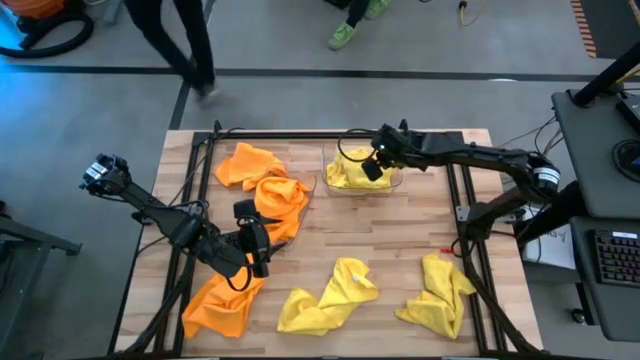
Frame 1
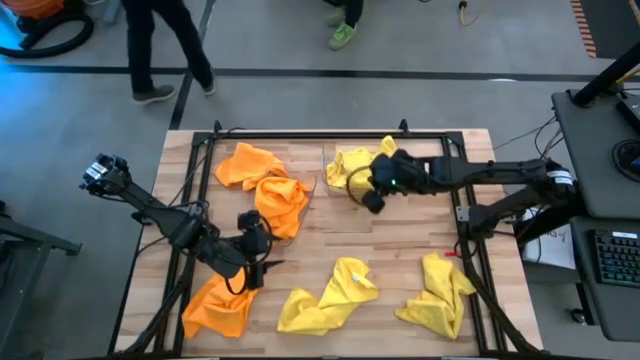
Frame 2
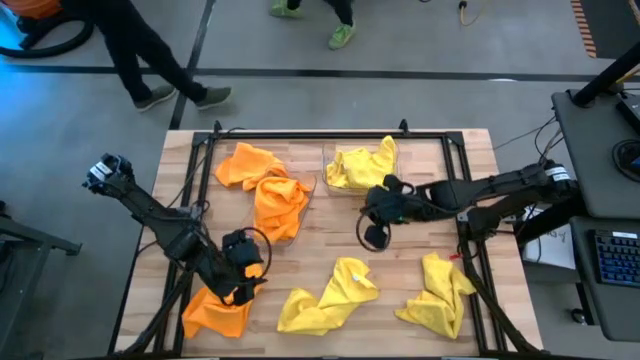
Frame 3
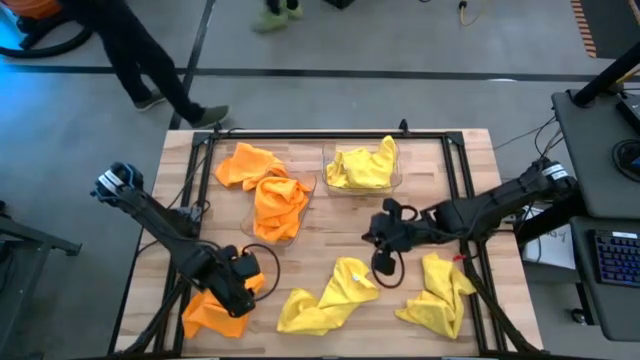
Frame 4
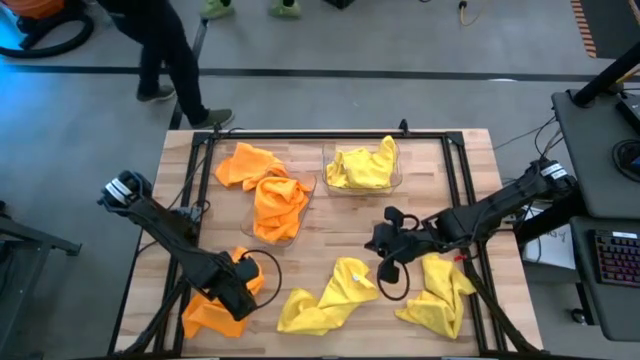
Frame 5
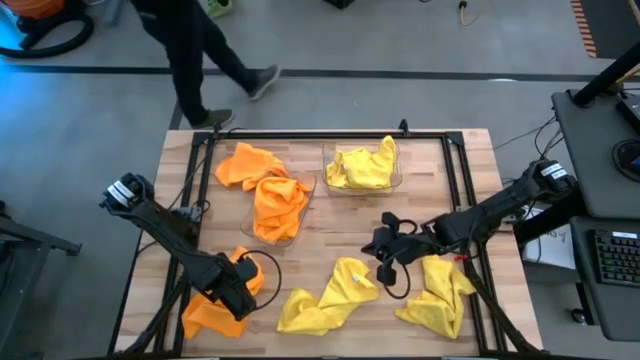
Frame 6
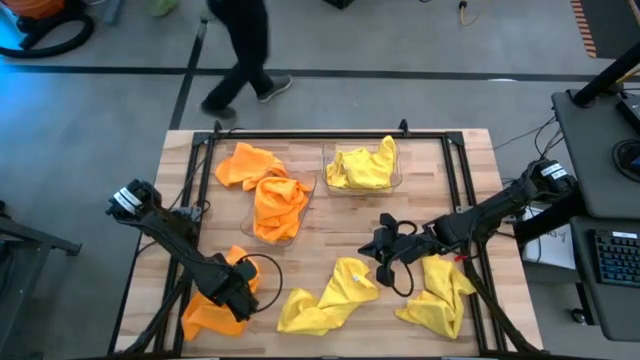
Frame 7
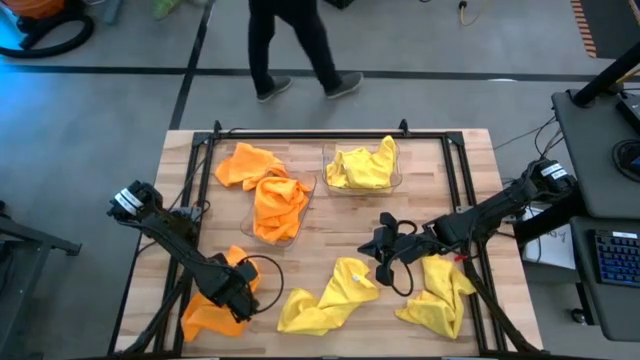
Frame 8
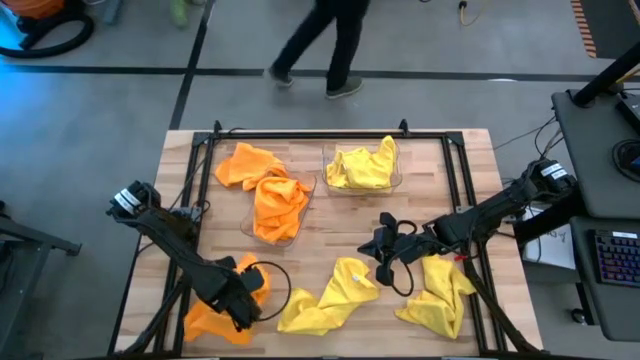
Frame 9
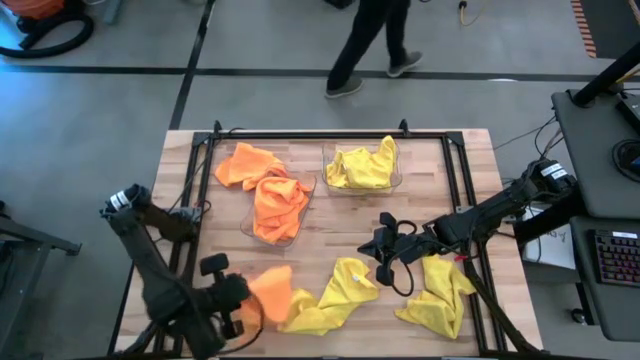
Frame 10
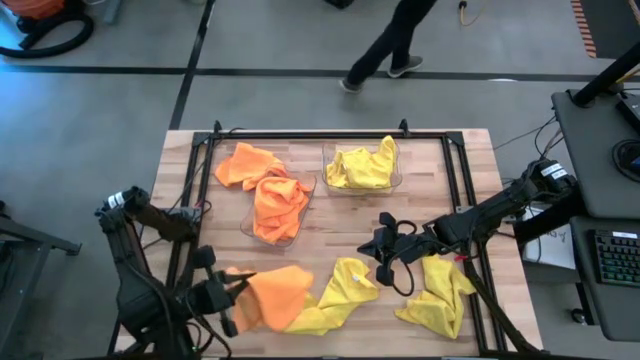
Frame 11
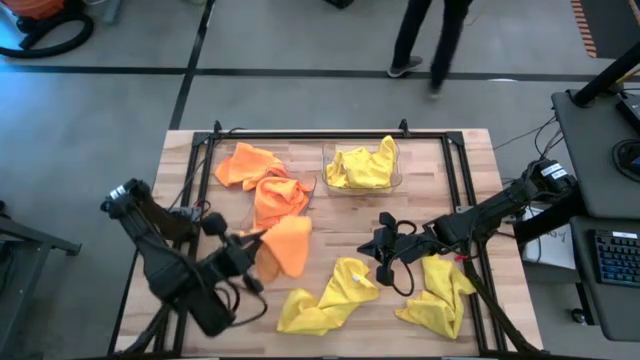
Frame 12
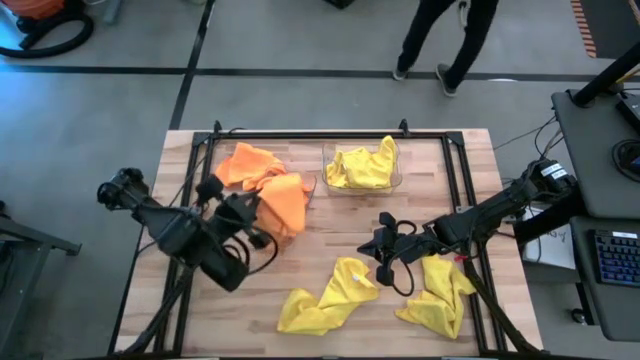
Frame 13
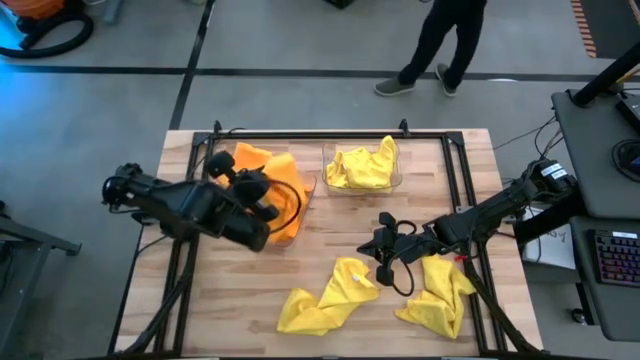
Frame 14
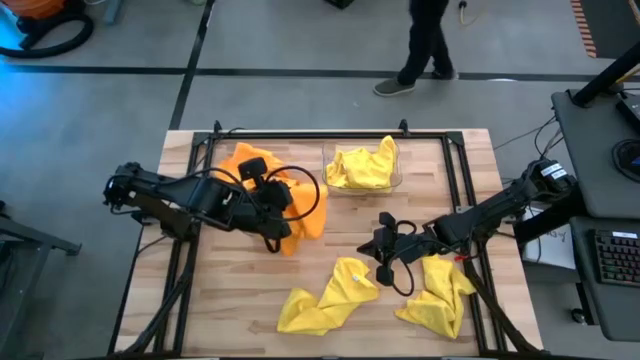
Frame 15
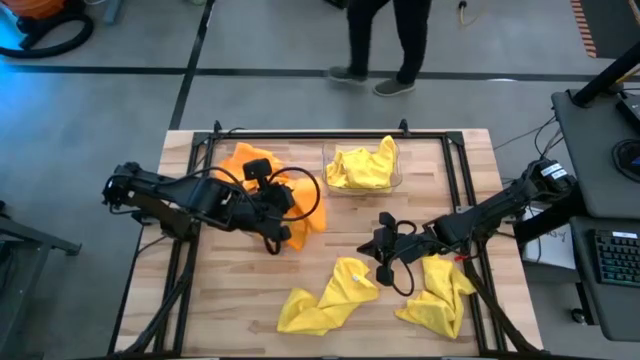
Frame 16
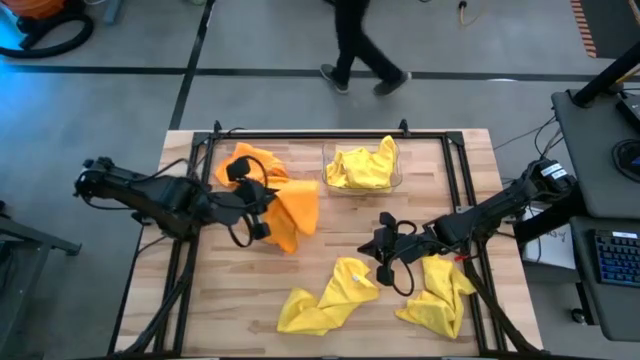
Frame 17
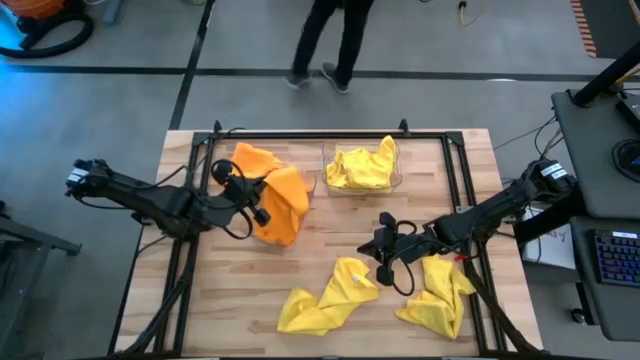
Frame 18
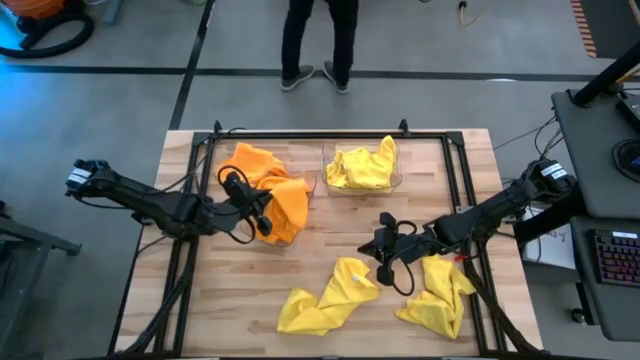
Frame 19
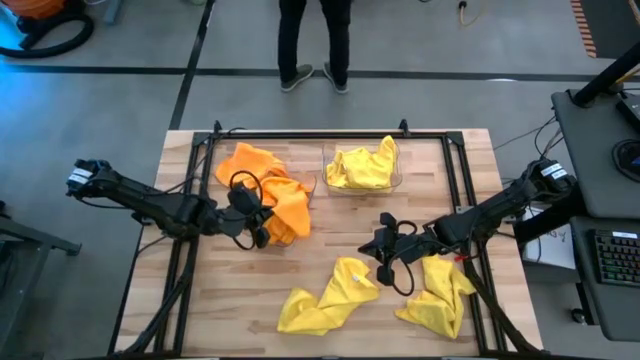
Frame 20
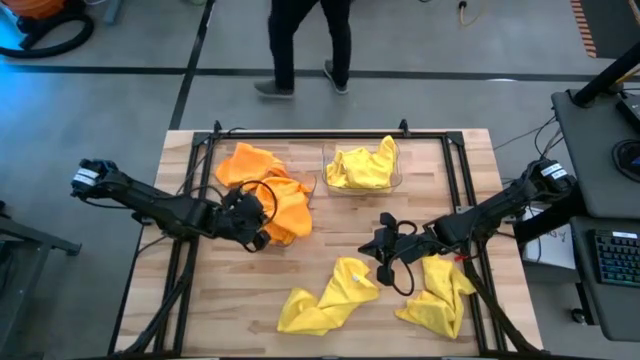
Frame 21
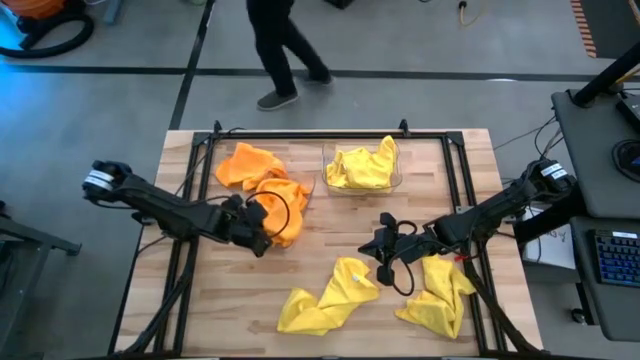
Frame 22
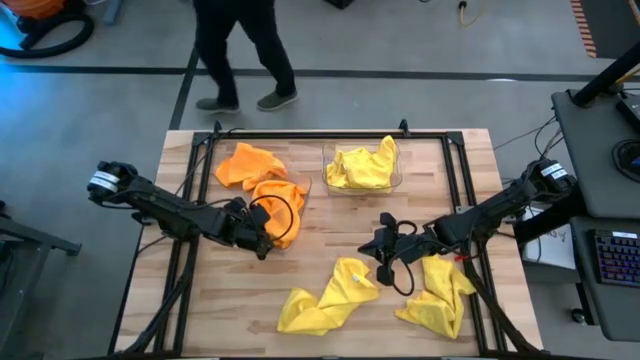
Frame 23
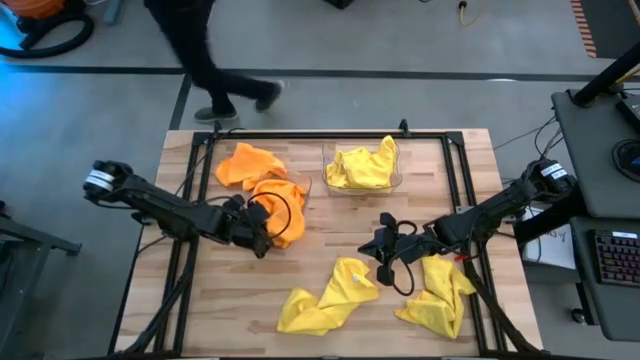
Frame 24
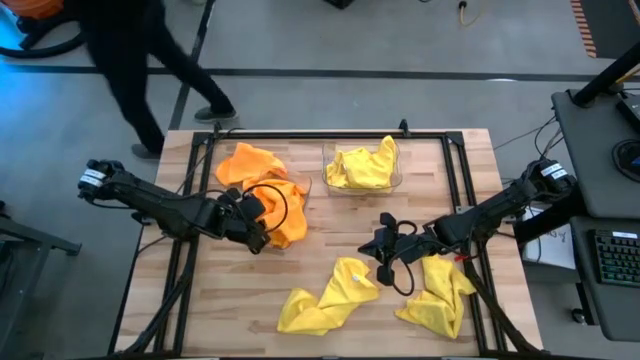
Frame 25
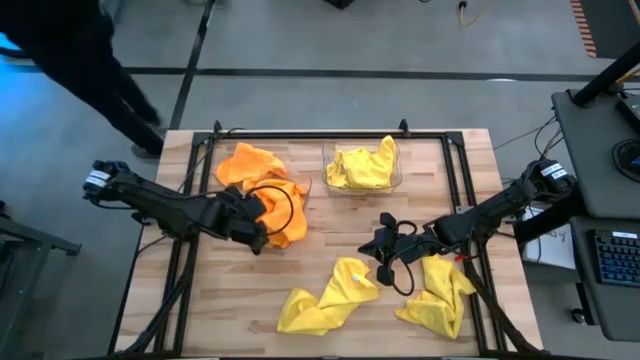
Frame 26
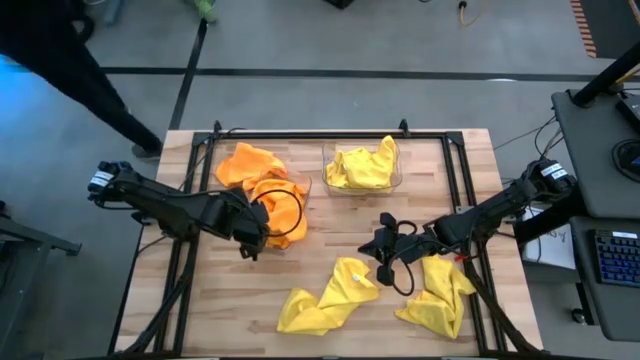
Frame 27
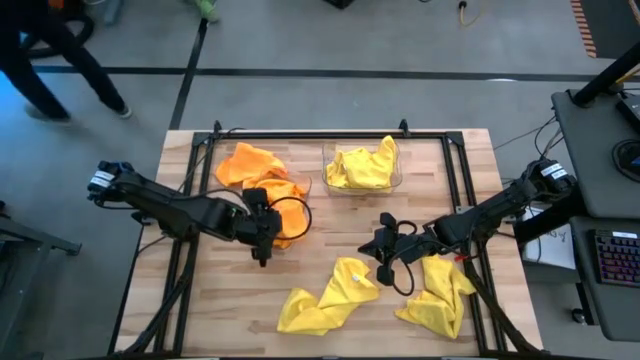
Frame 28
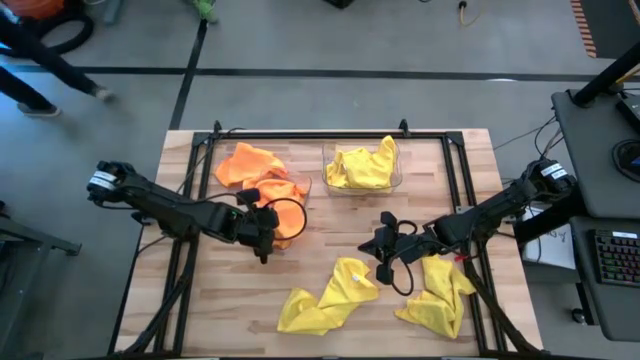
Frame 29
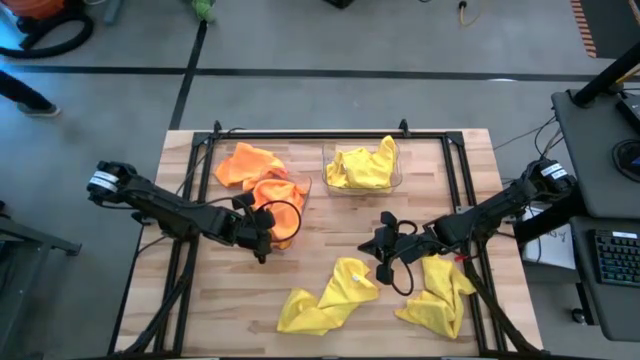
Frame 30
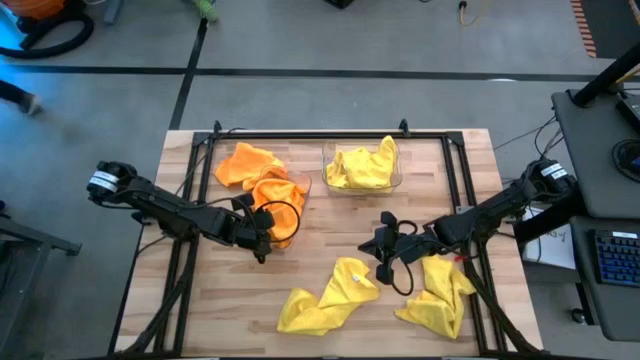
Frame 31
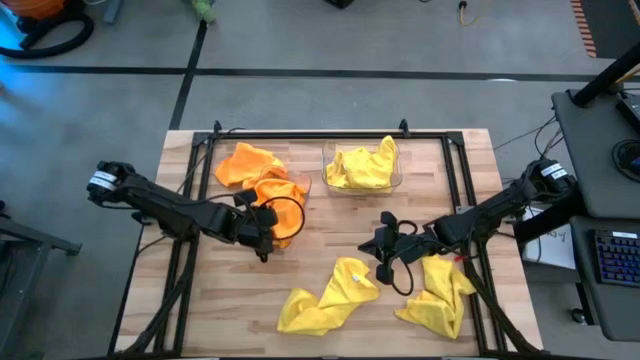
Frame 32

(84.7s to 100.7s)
Task: Sort microfiber towel by color & place in baskets
Put the orange microfiber towel into the left transparent bin

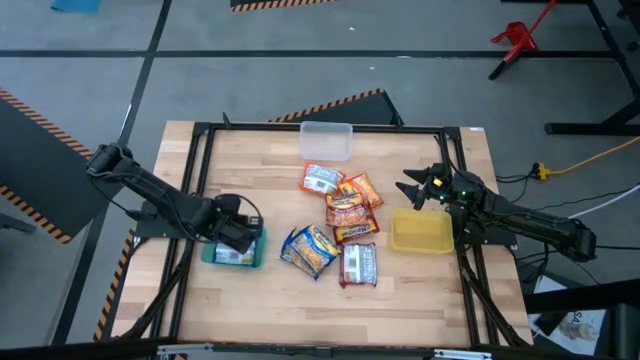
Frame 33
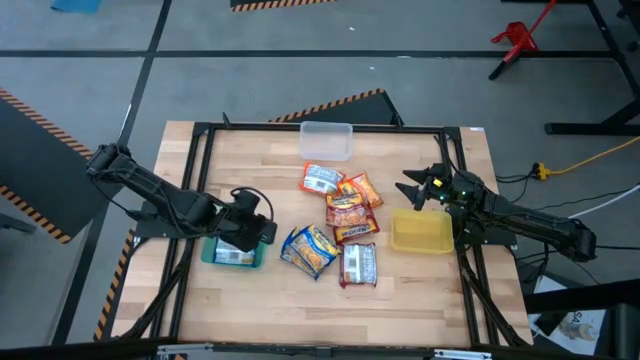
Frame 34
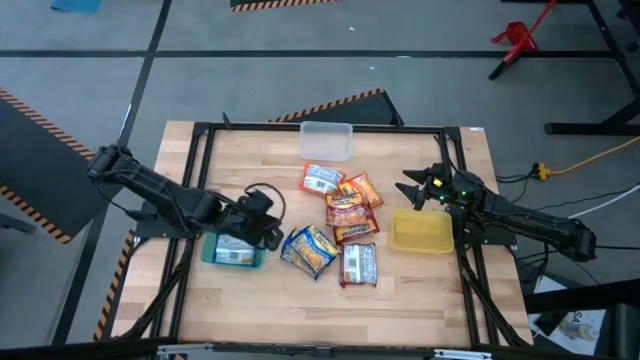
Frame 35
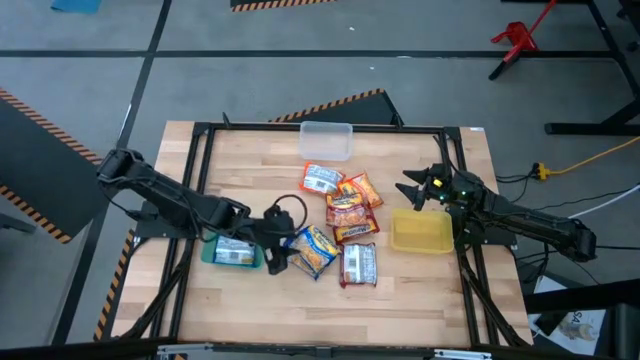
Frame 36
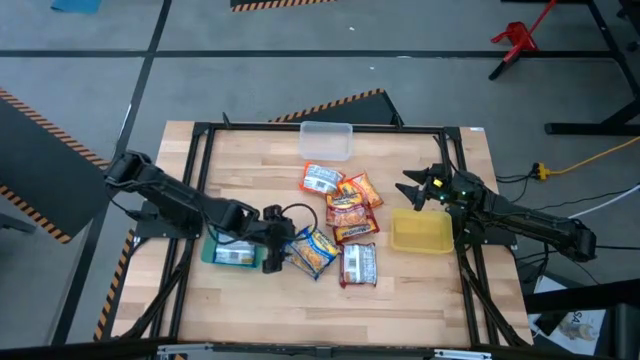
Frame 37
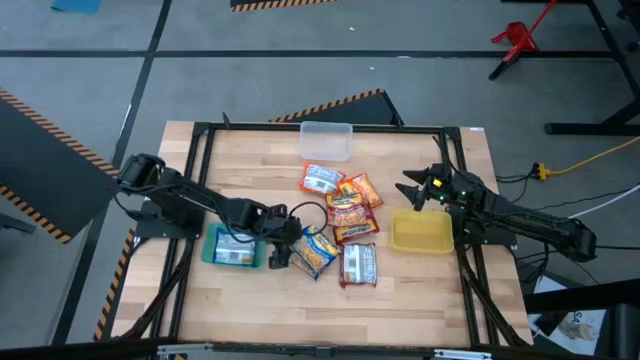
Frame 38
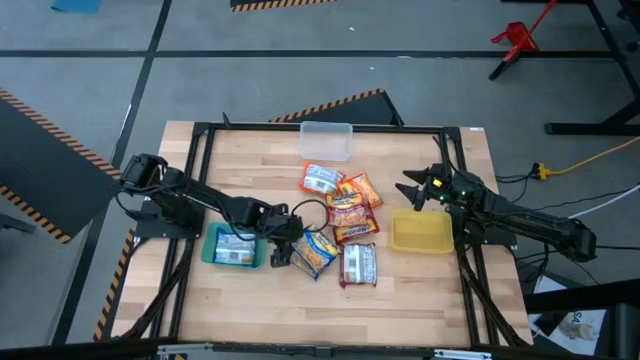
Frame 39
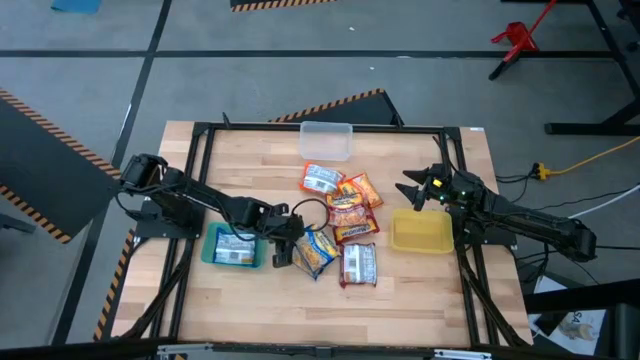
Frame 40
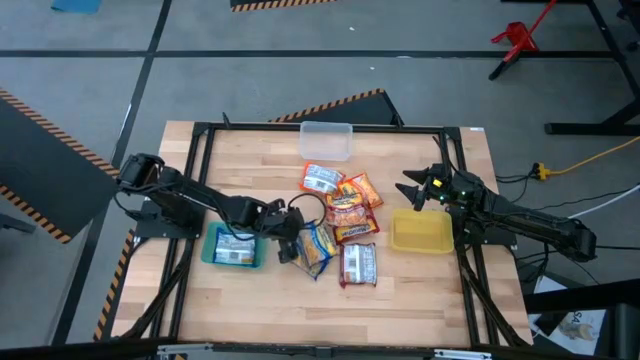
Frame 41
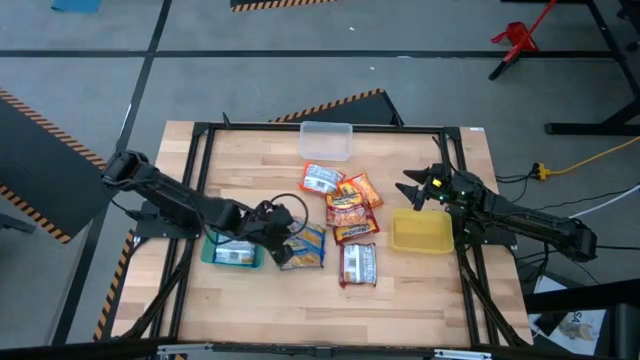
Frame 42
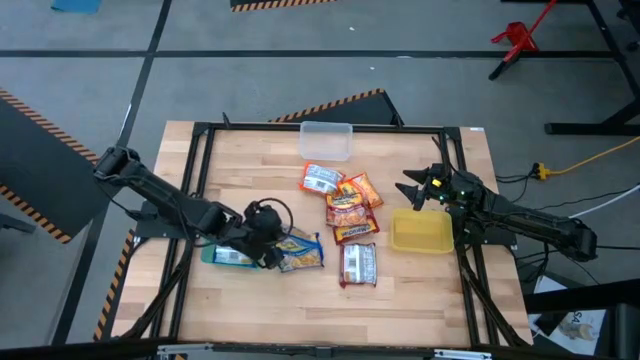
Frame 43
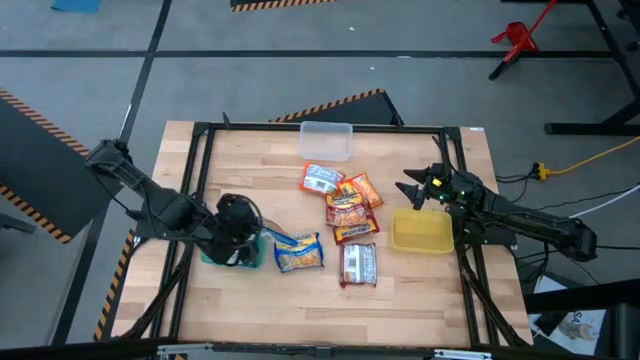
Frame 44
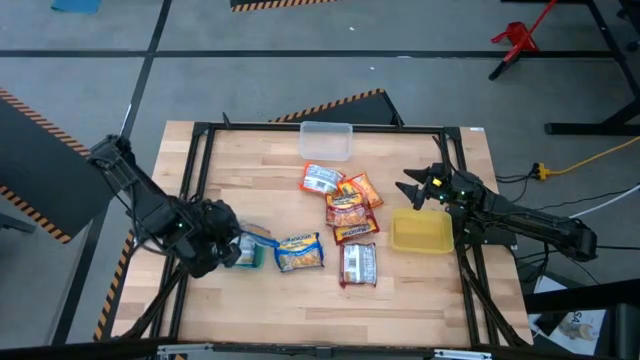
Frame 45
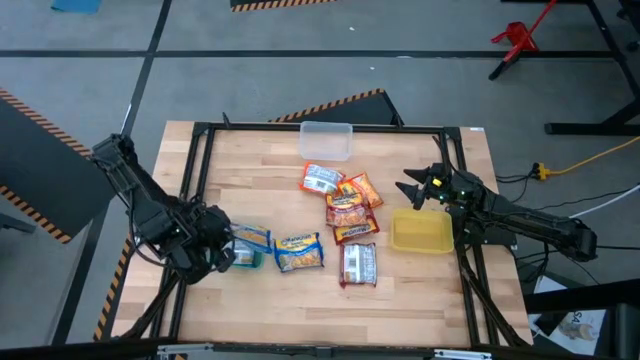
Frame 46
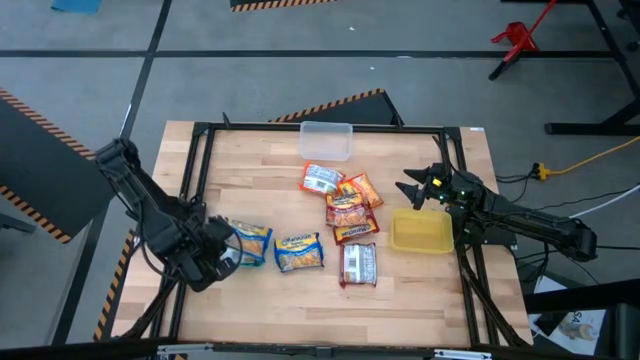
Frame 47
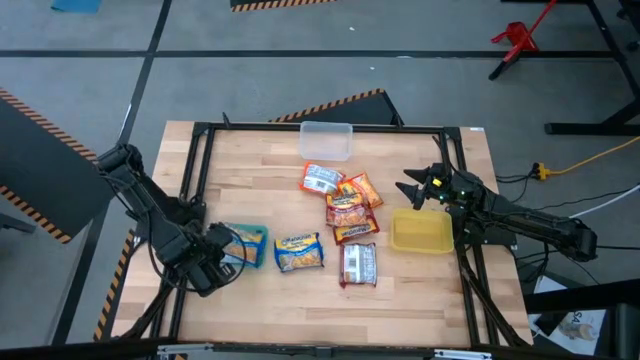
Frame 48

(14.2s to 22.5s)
Task: Sort Maruchan noodles
Put the right blue noodle pack into the green bin
